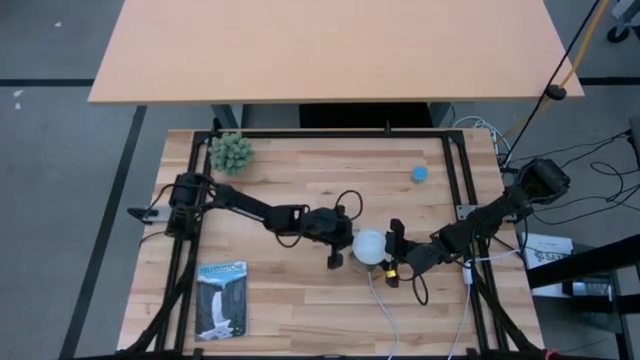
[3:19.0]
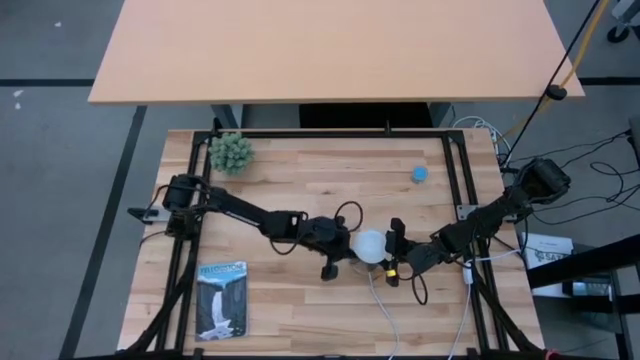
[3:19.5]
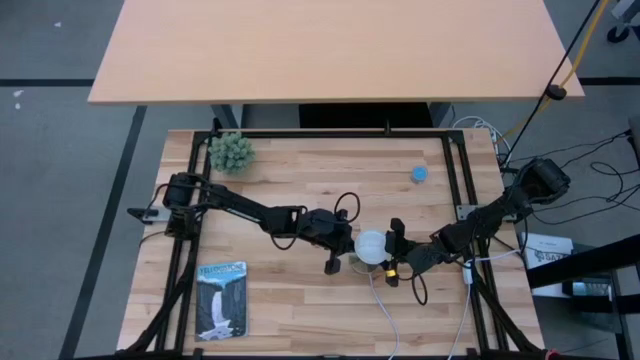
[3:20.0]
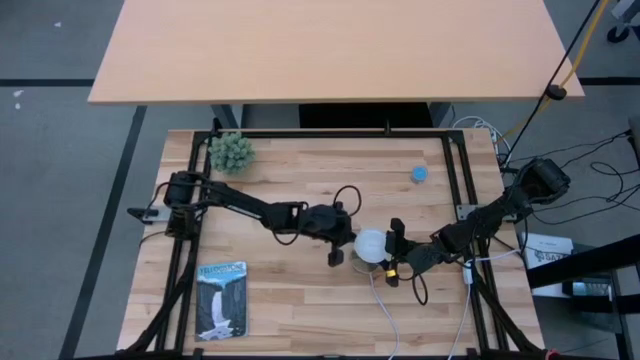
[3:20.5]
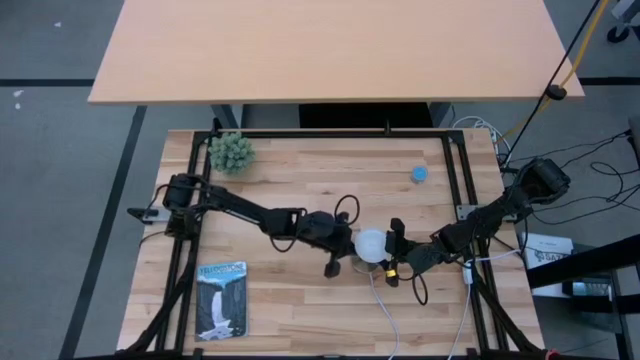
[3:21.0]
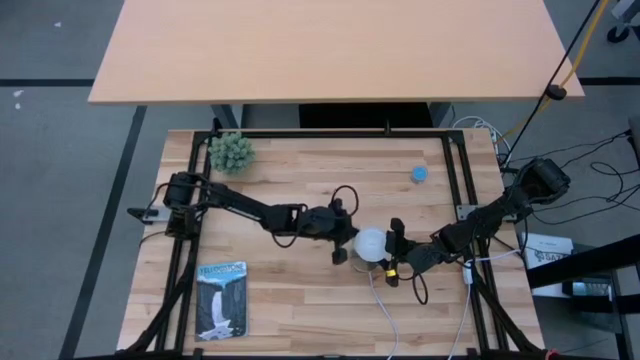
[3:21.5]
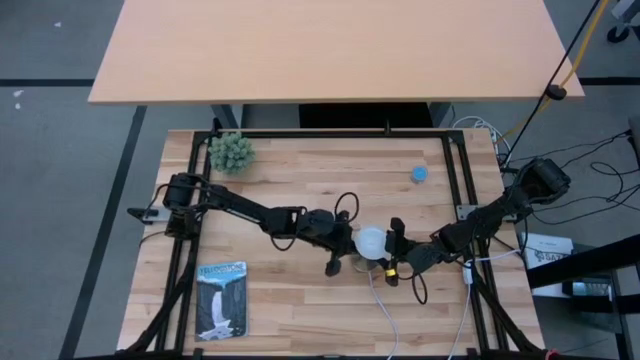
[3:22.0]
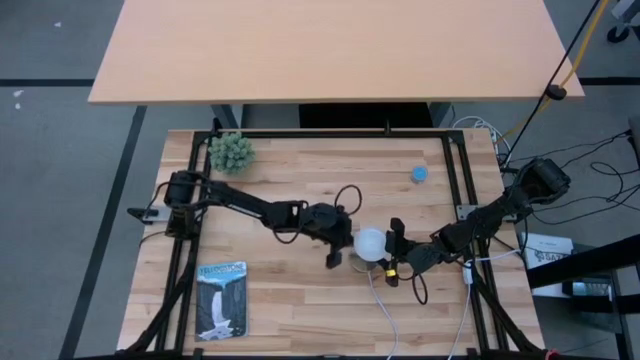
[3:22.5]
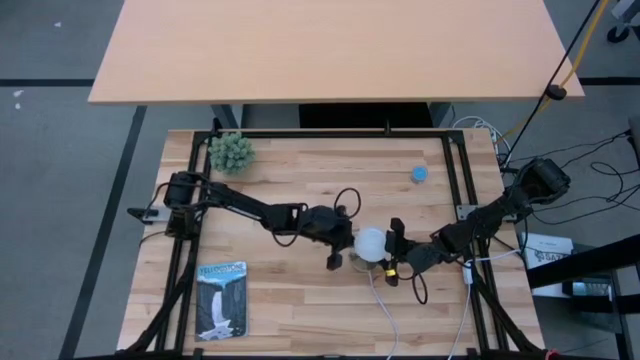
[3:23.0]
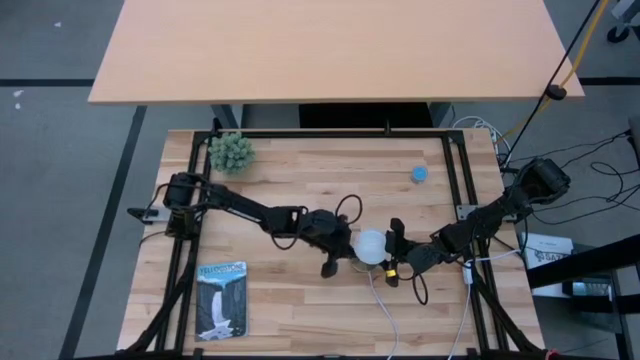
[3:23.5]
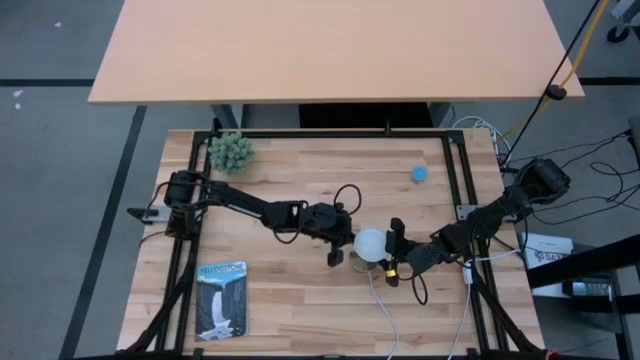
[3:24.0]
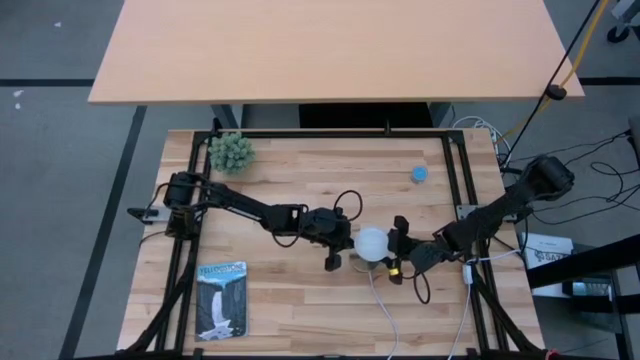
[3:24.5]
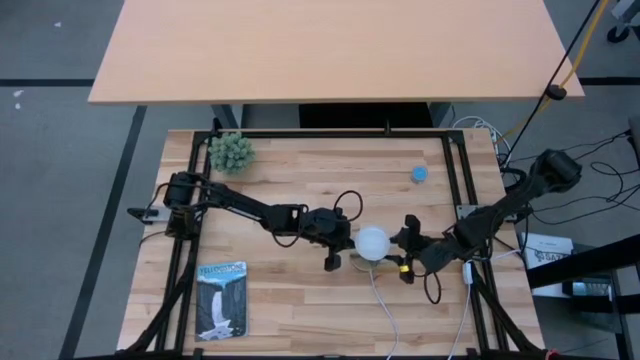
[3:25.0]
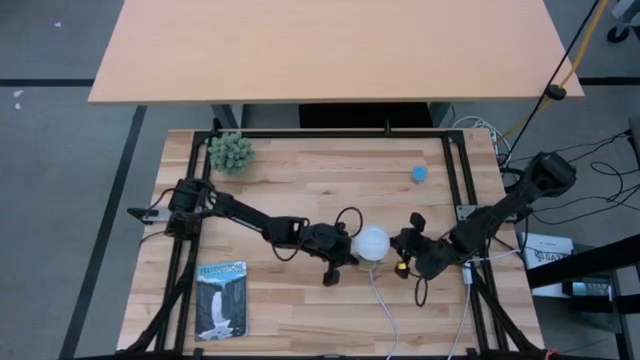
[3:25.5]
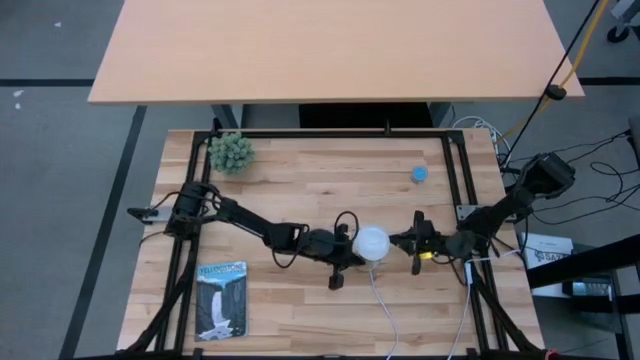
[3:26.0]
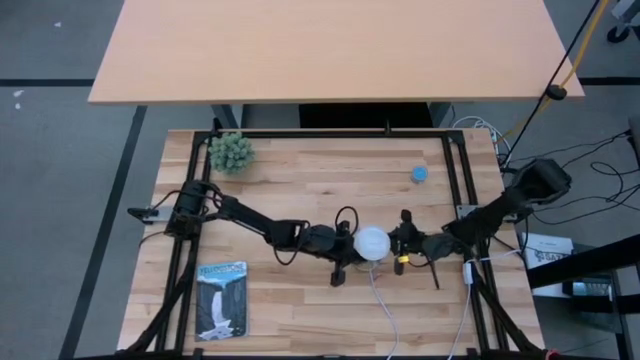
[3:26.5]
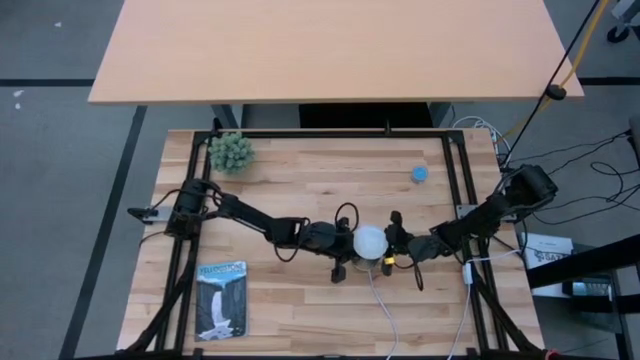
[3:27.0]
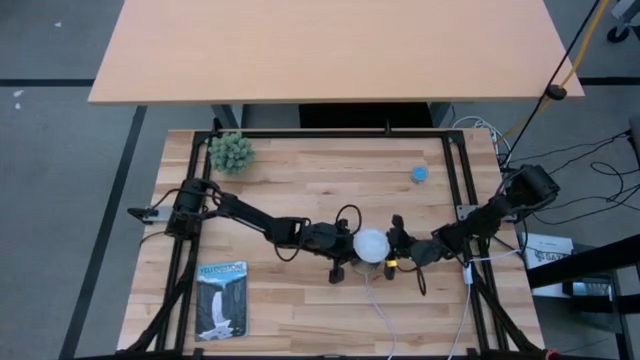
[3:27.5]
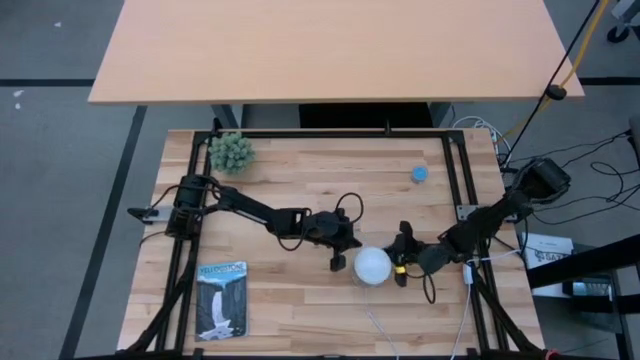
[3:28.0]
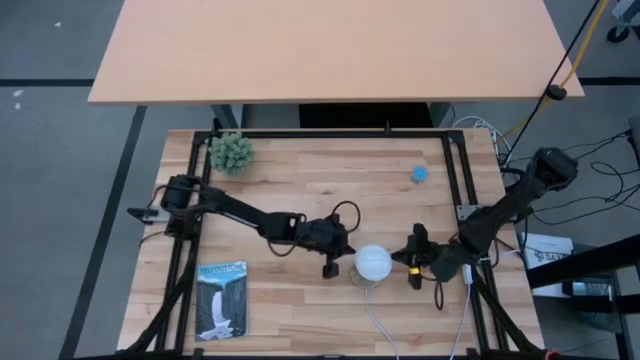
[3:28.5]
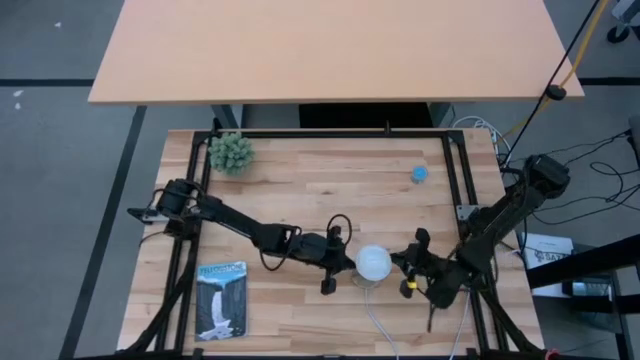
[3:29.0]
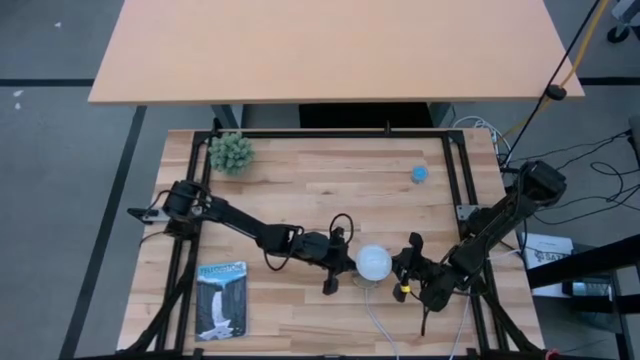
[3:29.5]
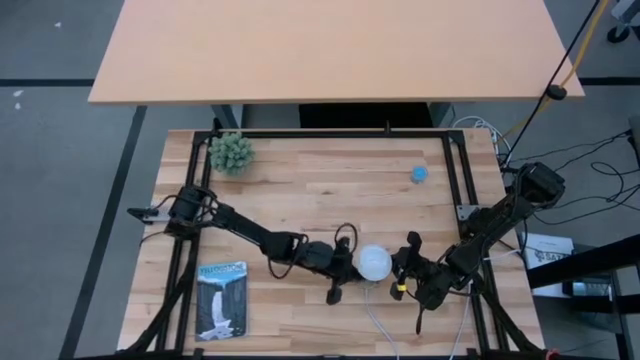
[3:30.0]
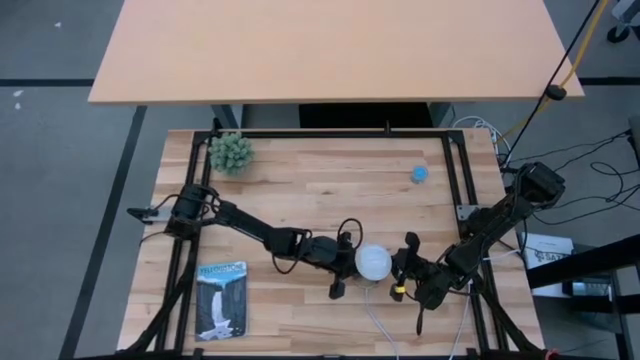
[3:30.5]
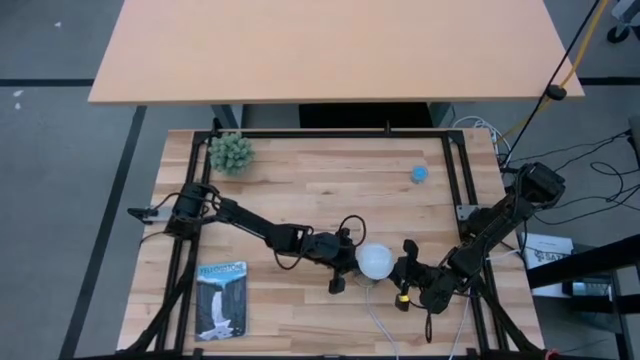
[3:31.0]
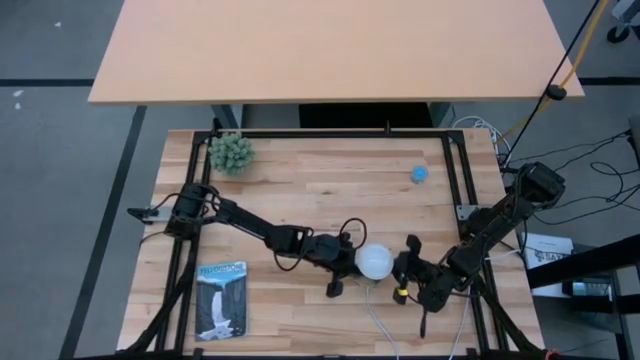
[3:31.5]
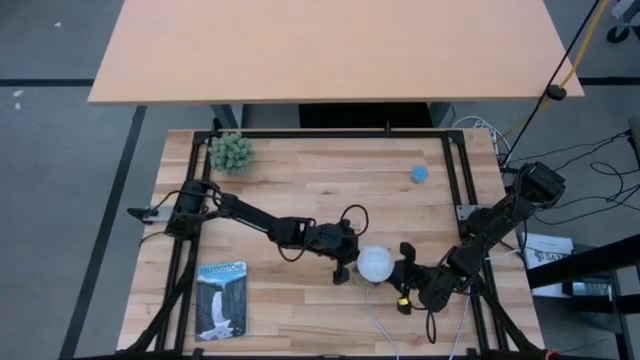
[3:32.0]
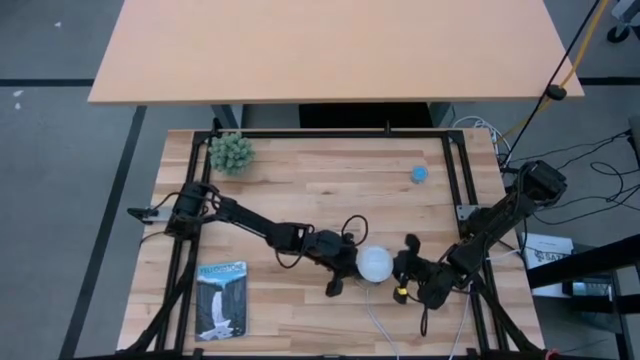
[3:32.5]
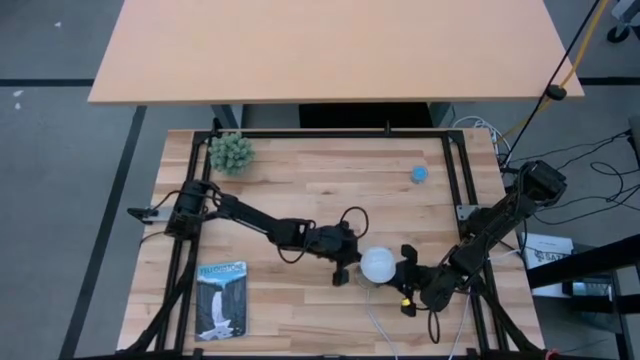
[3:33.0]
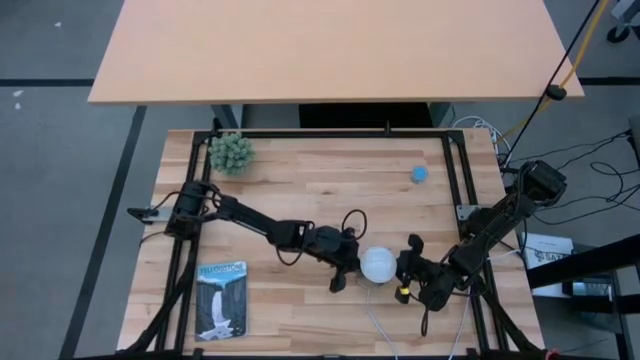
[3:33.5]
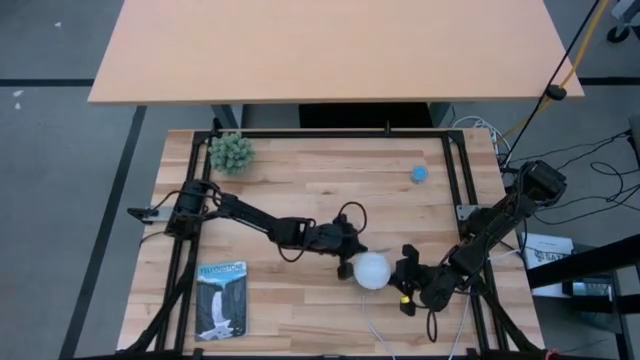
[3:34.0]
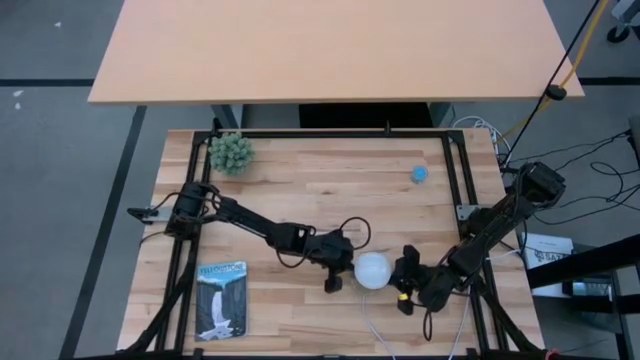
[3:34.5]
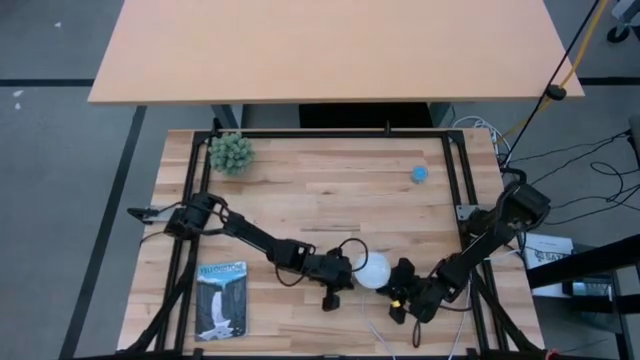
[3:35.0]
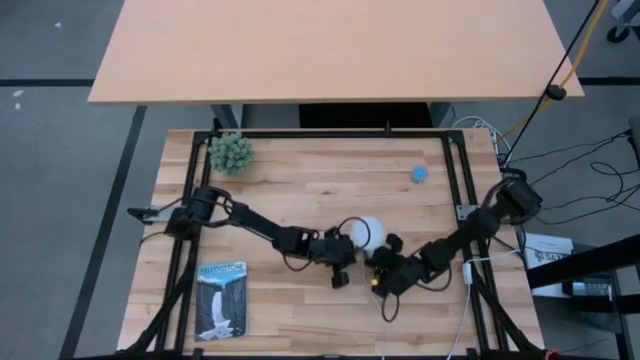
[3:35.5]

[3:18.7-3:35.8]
Task: Screw lightbulb
Insert the lightbulb into the desk lamp

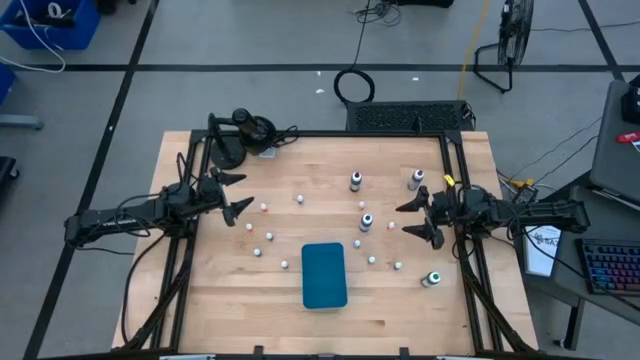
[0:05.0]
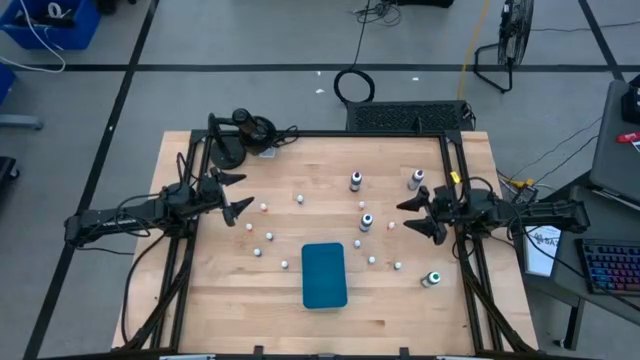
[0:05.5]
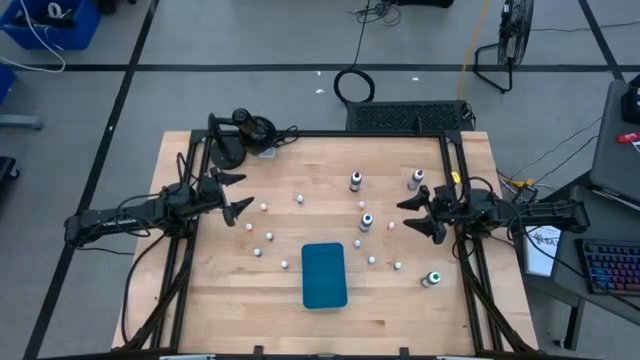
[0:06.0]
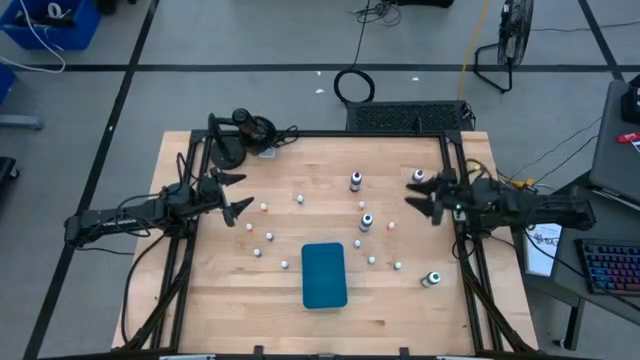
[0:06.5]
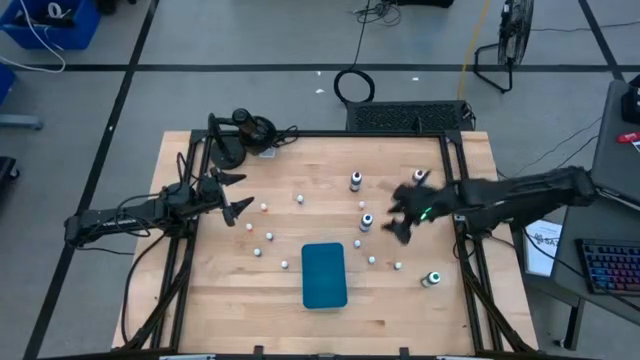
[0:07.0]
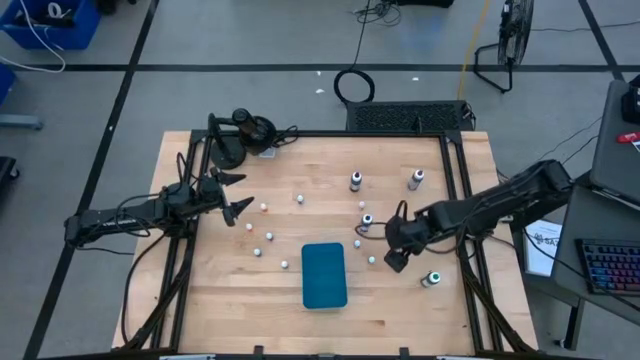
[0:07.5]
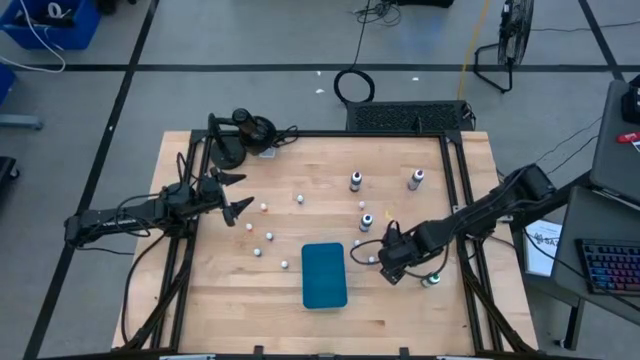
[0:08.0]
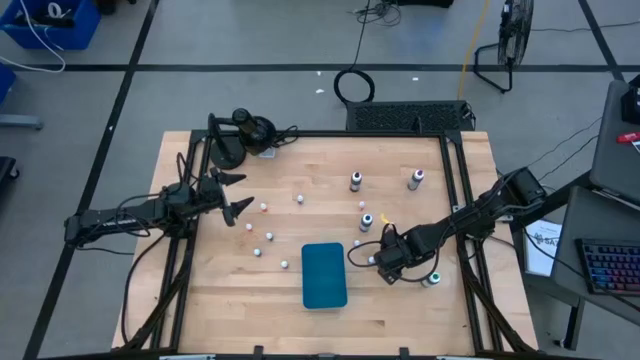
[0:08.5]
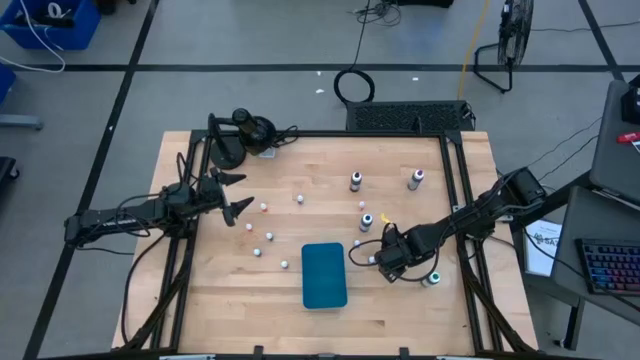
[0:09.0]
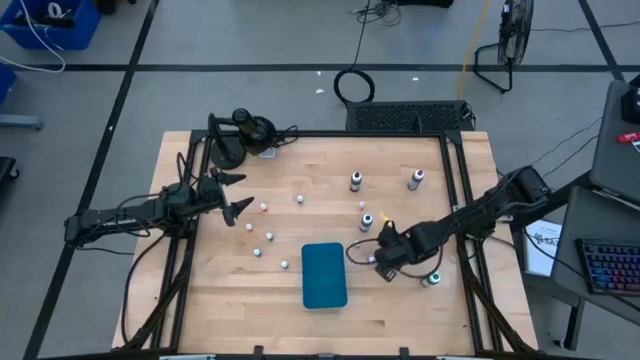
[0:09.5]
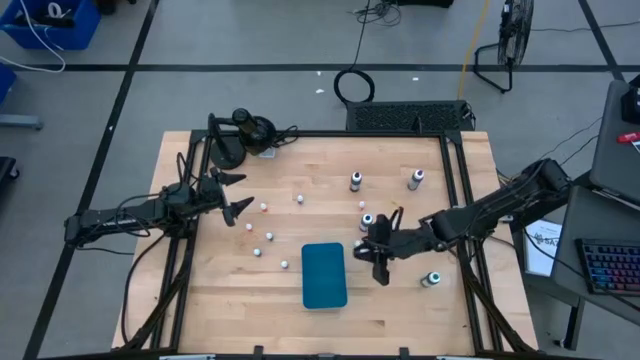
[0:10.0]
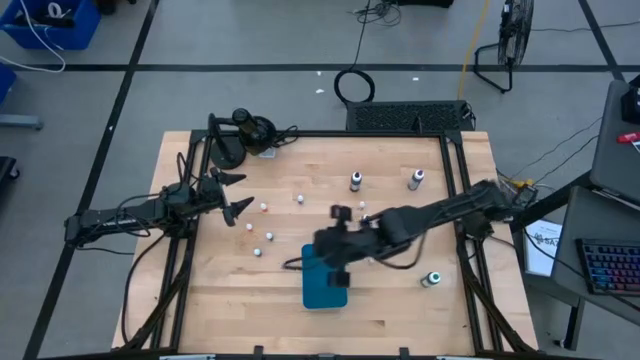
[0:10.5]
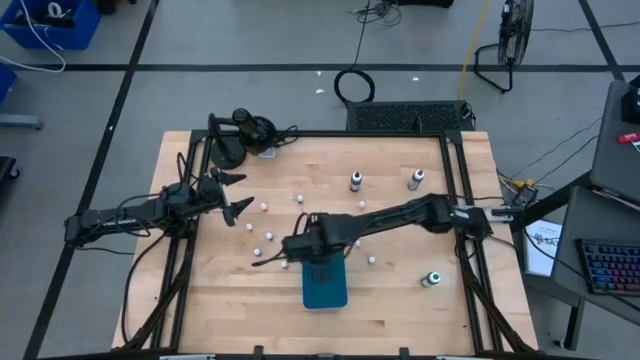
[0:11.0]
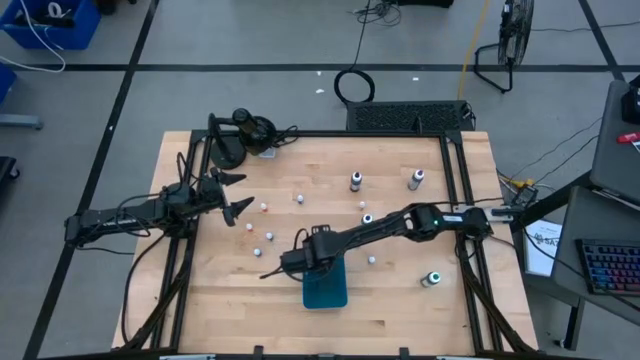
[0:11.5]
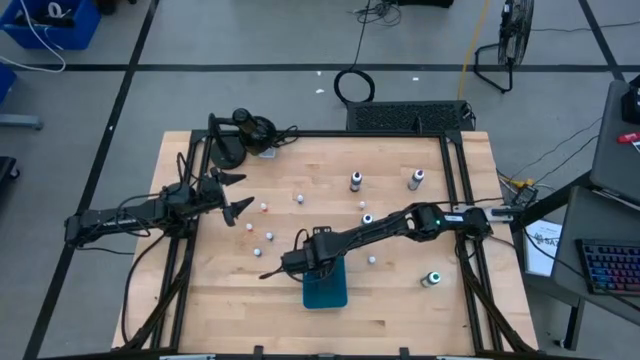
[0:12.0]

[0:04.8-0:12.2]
Task: Pick & Place food coloring
Put the blue small food coloring bottle into the blue bin
